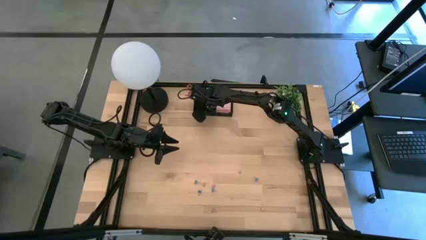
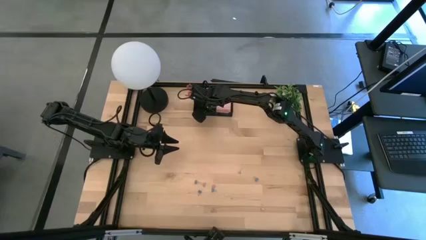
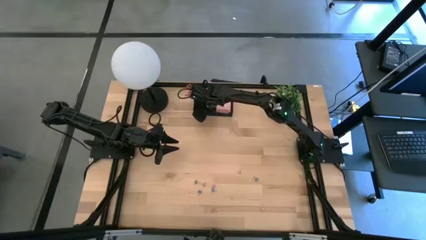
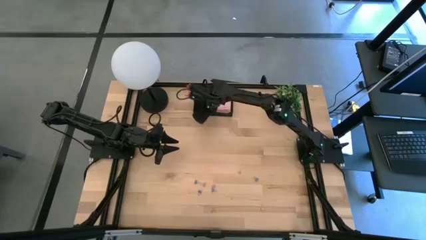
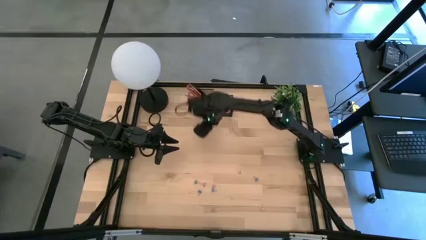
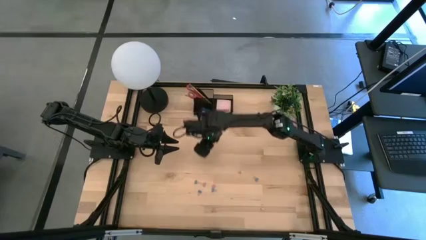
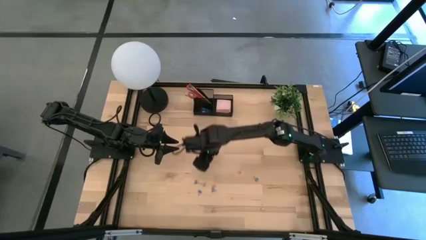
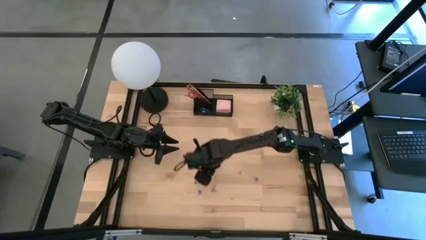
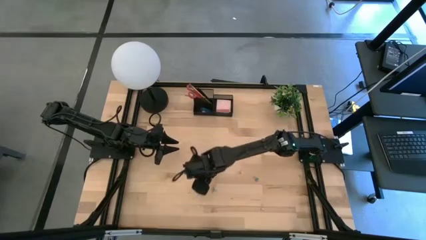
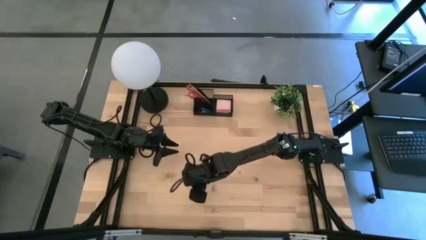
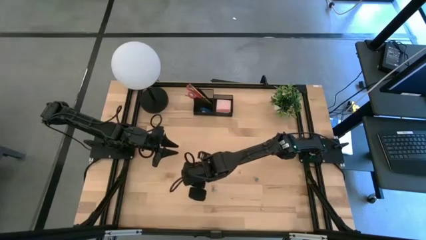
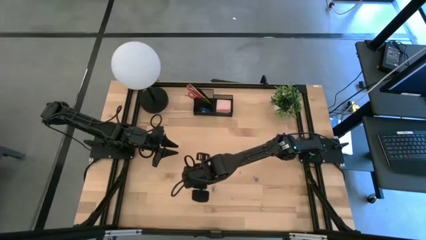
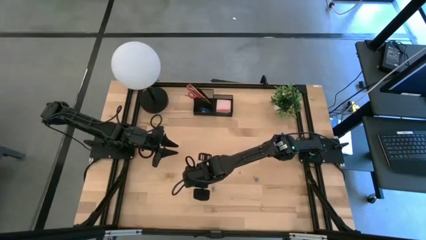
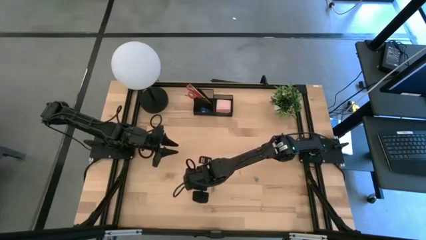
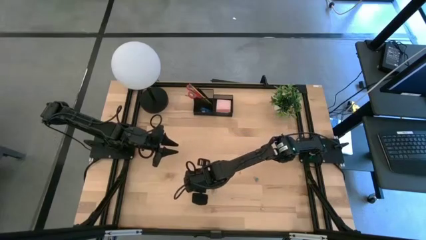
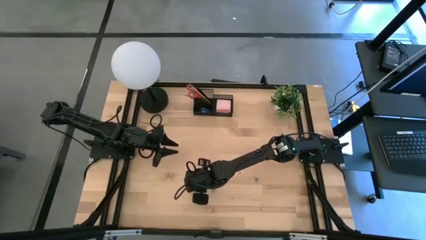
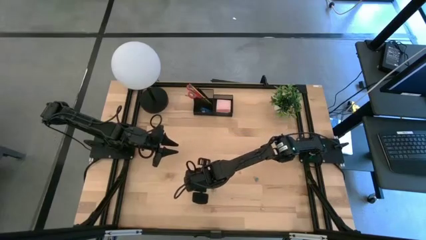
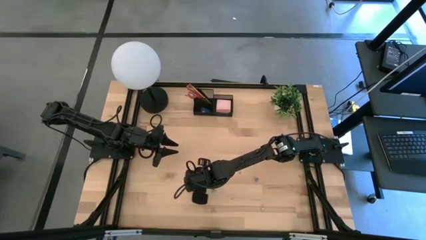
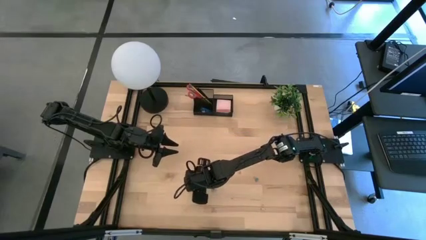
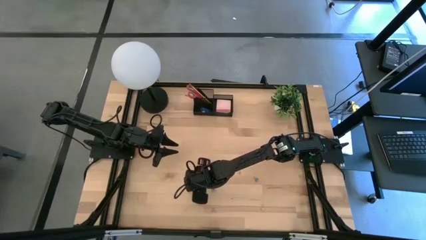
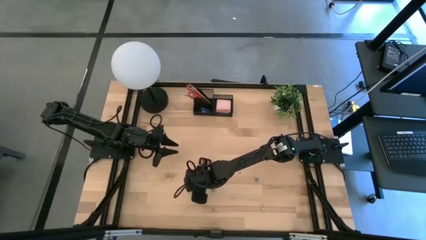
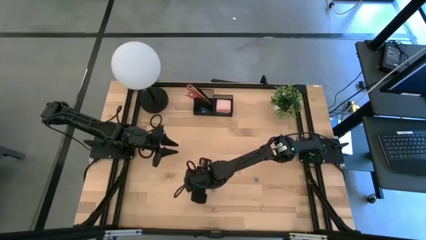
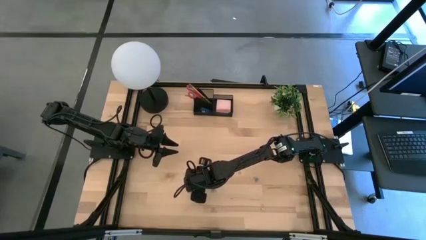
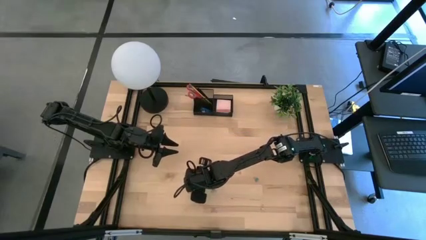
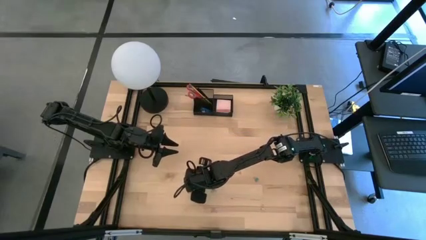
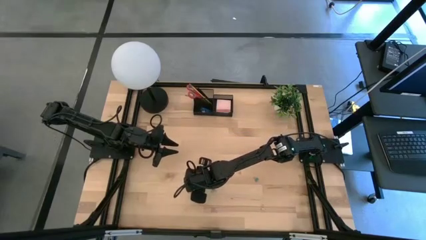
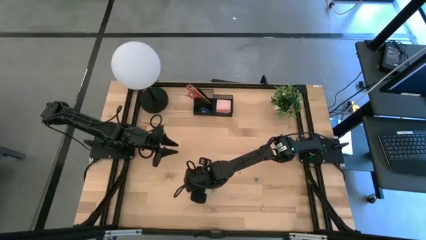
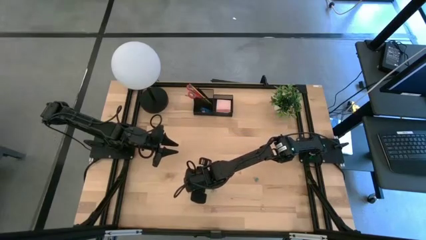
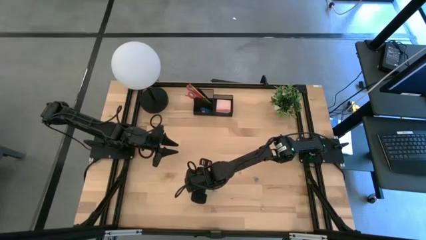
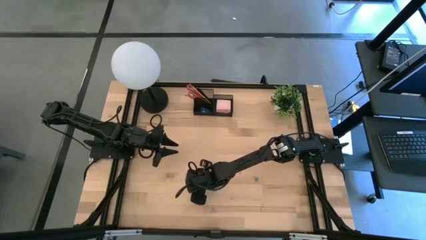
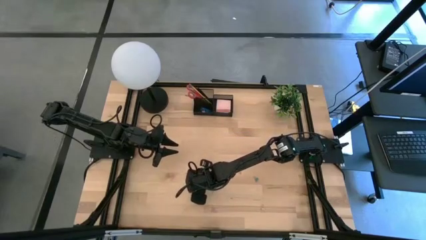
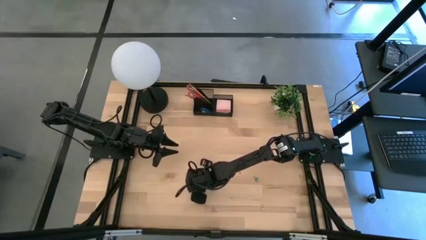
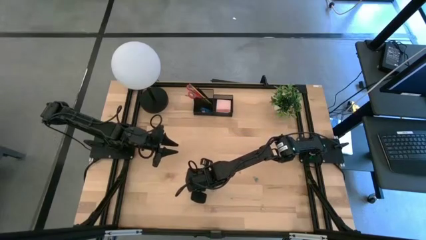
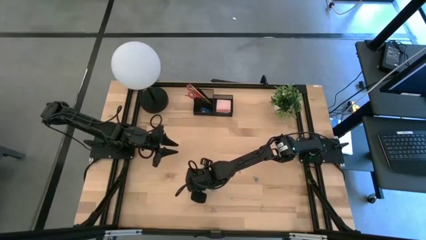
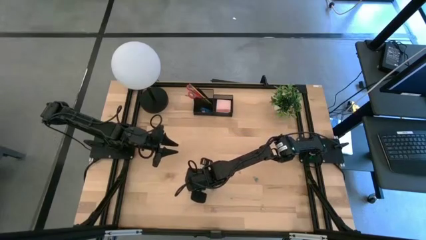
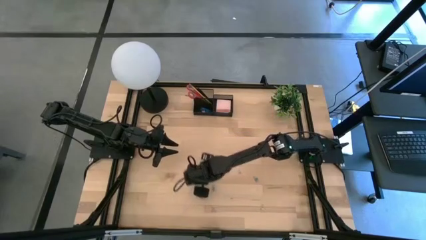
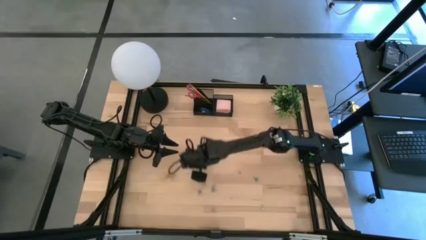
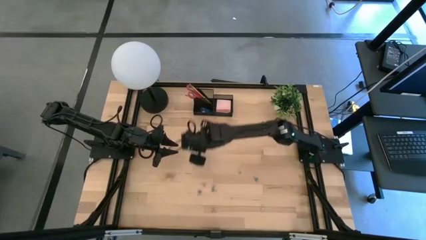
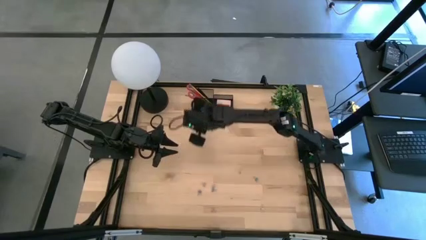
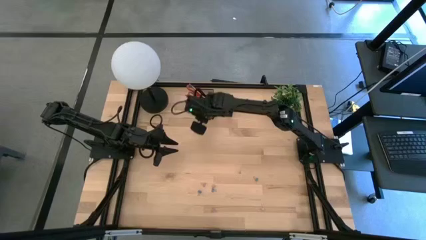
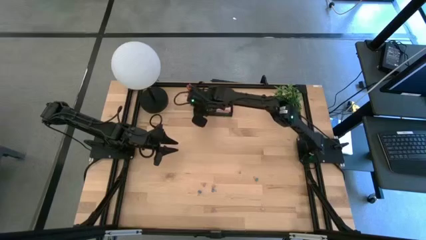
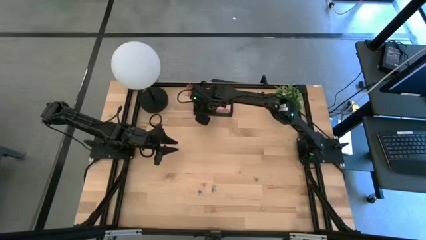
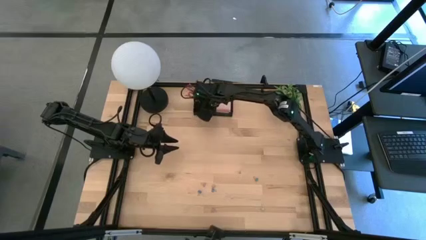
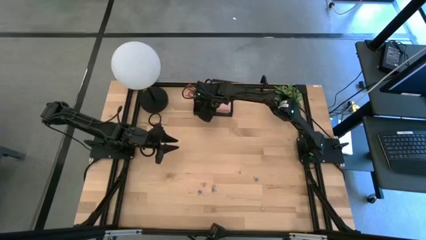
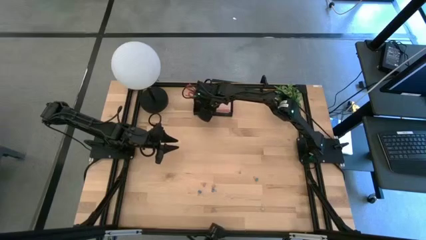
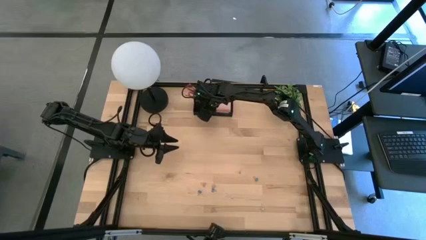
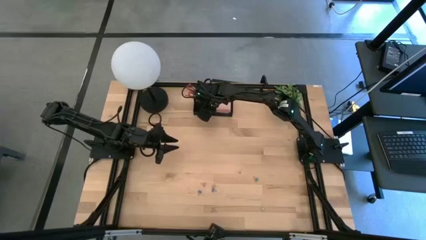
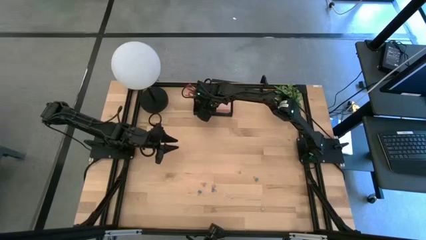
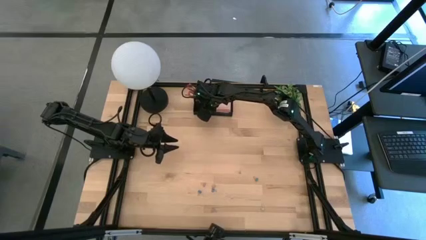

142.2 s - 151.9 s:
Task: Pick and place office supplies into organizer
Put the blue binder clip into the black desk organizer

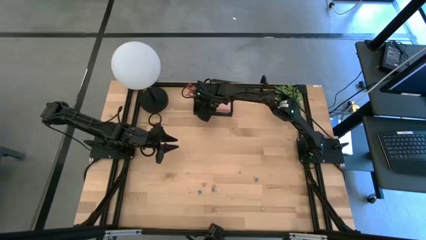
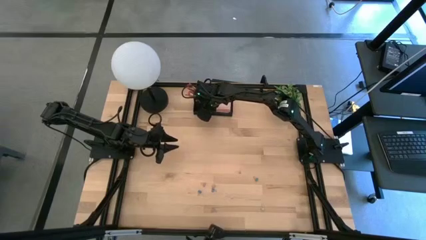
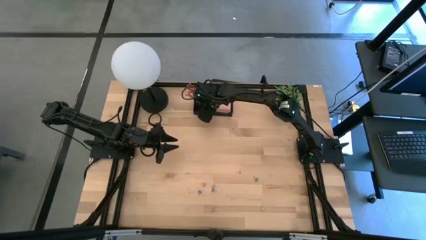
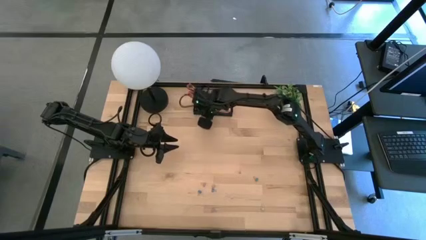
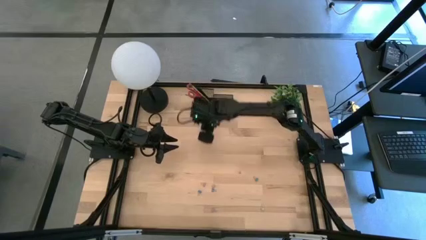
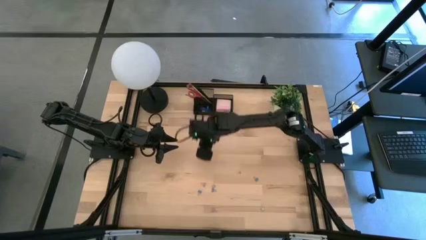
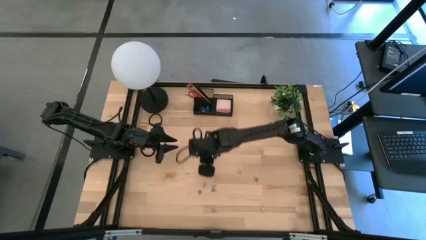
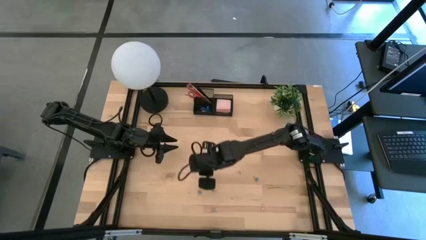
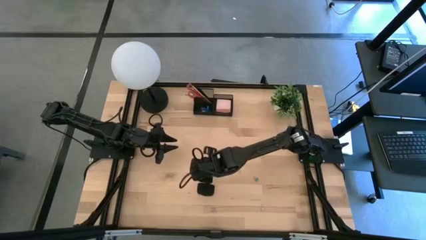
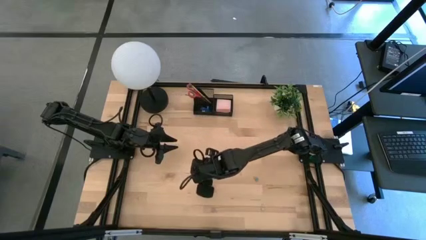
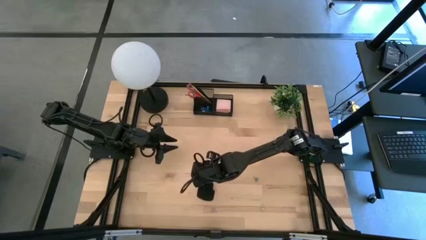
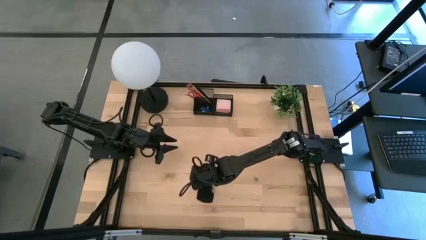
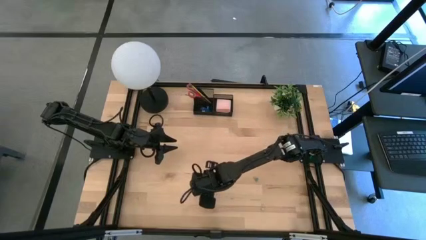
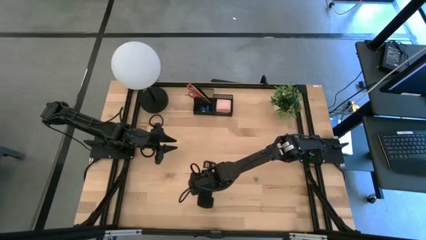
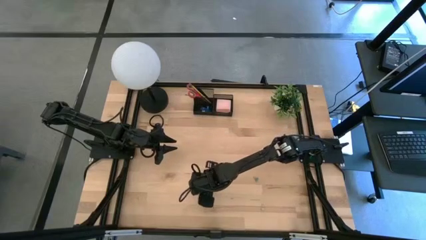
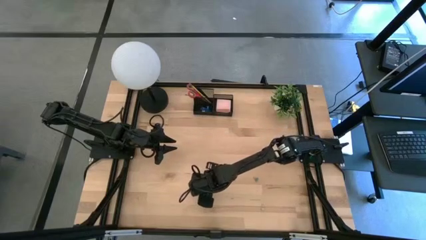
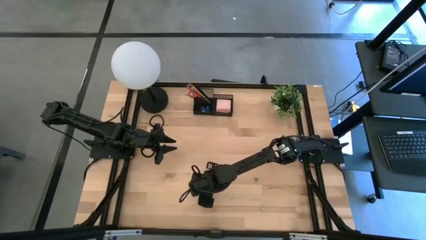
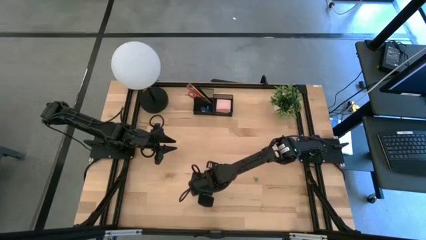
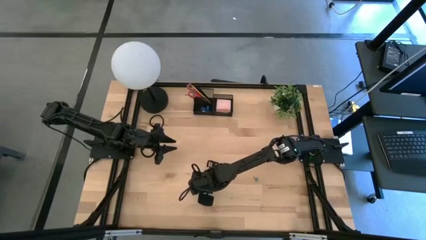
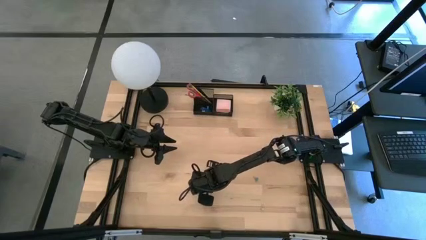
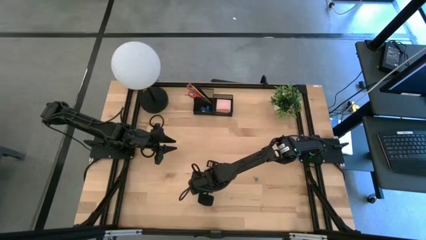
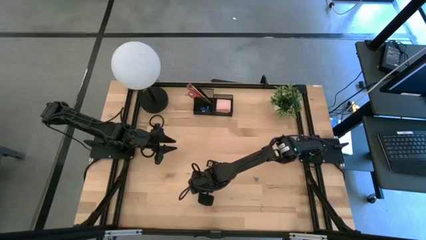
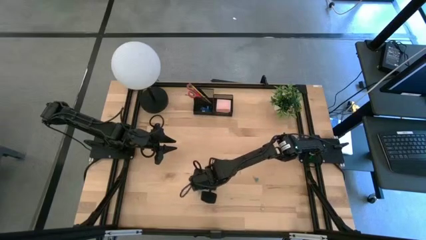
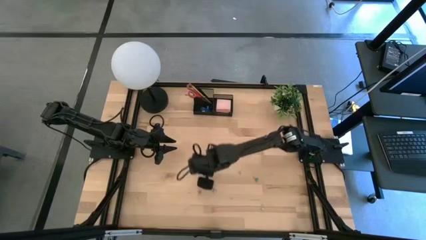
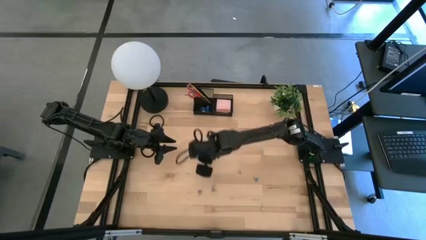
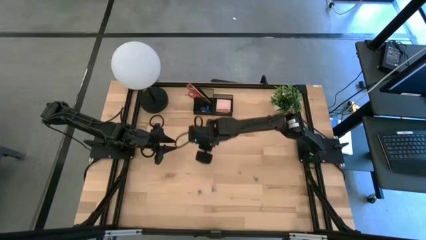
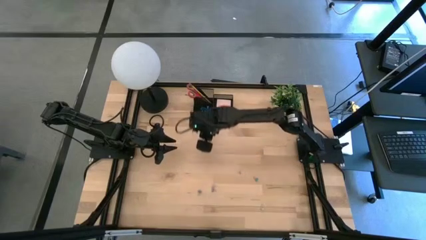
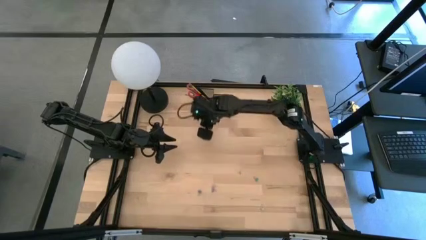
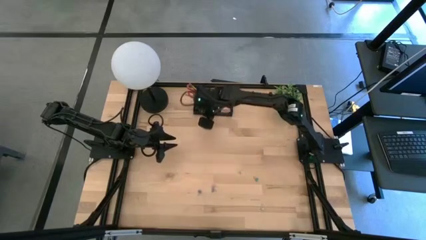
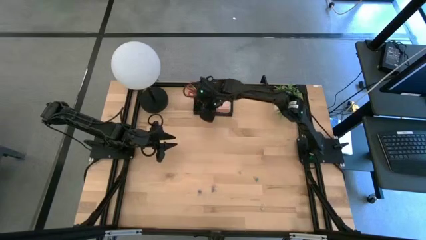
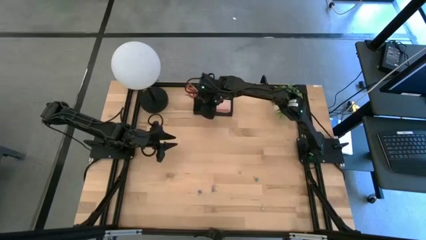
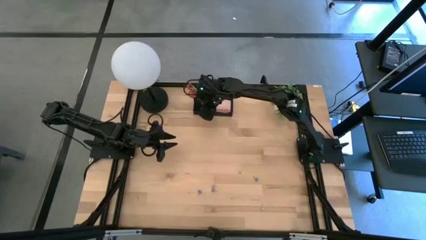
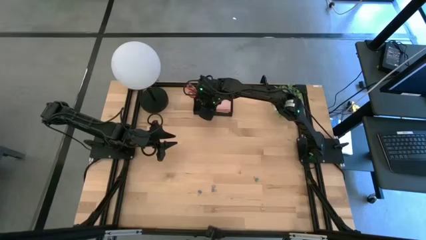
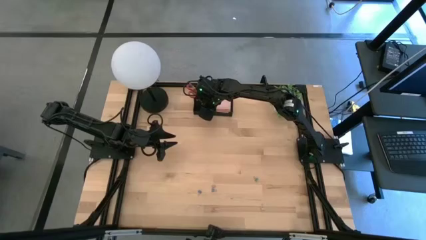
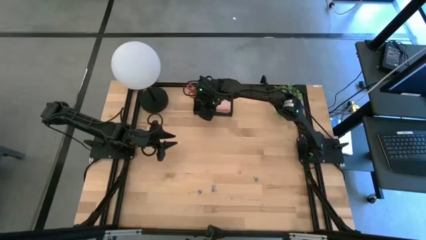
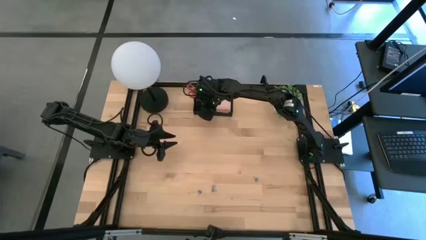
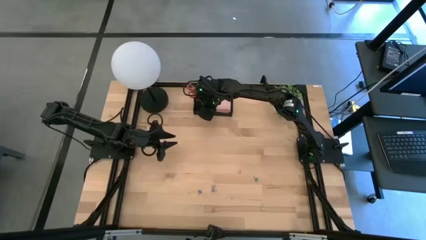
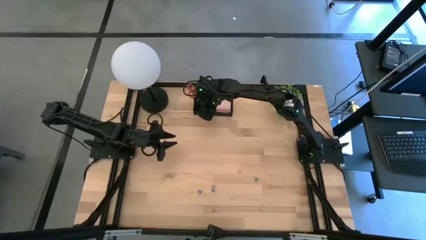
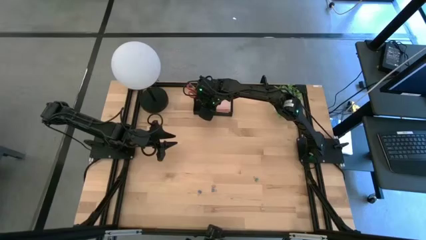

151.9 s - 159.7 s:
Put the pink binder clip into the black desk organizer
